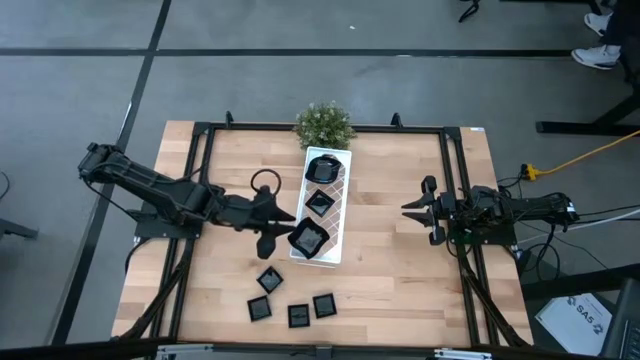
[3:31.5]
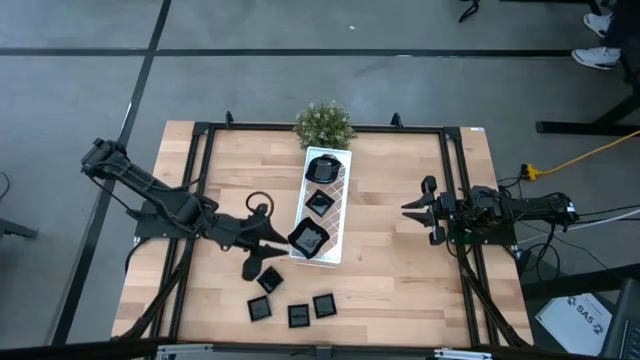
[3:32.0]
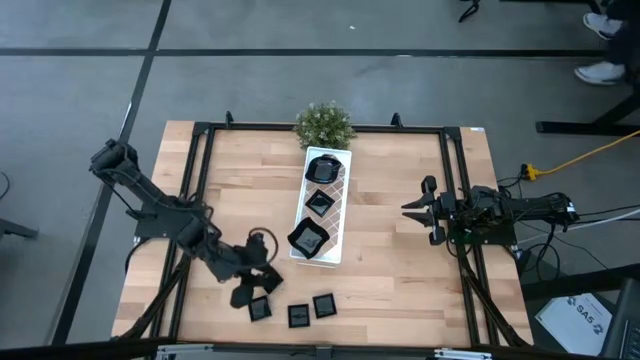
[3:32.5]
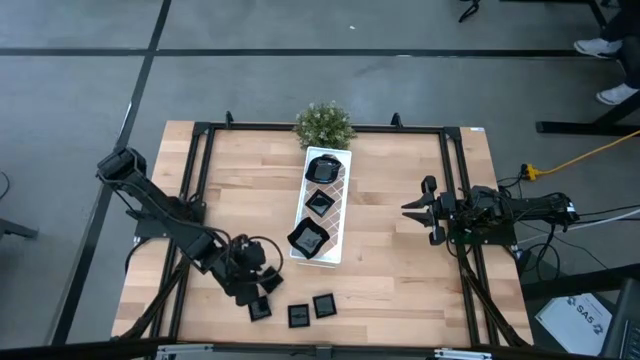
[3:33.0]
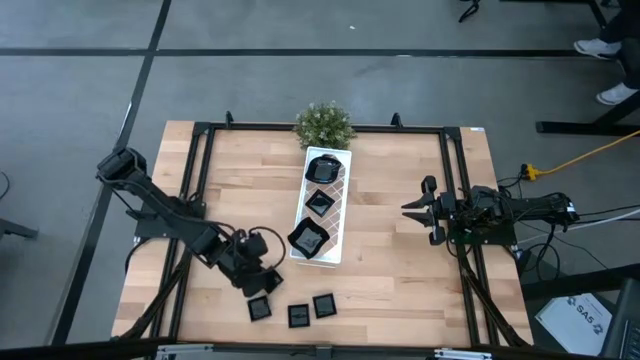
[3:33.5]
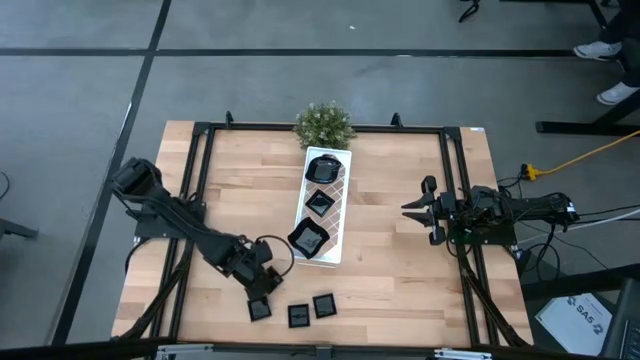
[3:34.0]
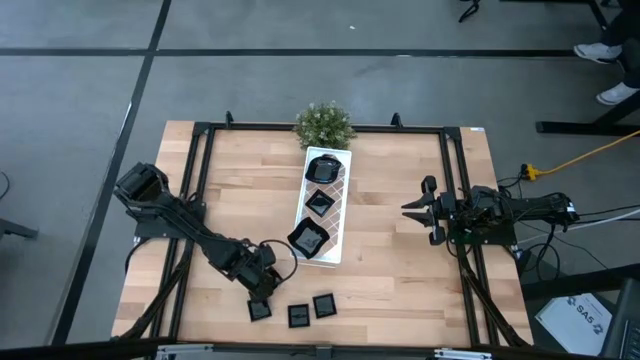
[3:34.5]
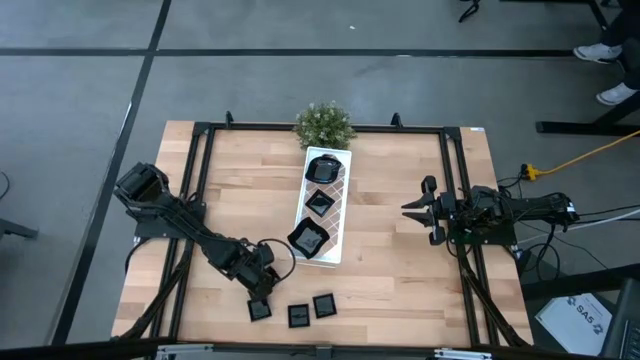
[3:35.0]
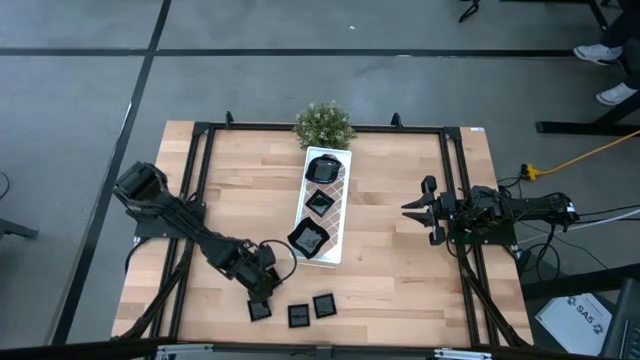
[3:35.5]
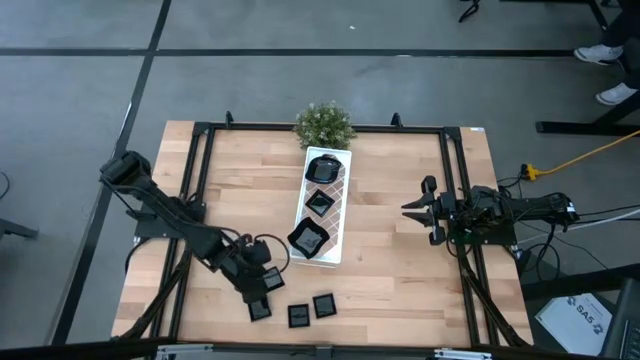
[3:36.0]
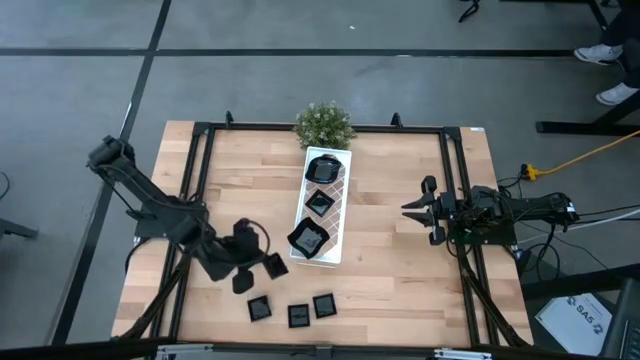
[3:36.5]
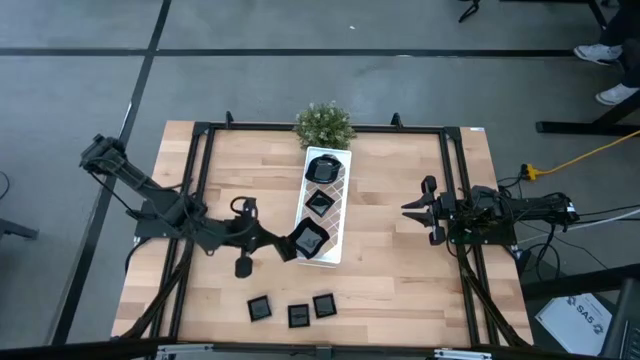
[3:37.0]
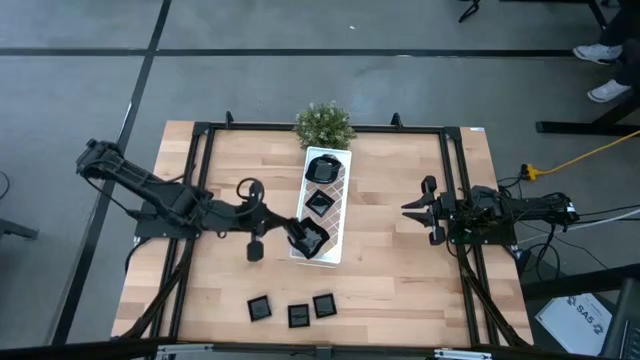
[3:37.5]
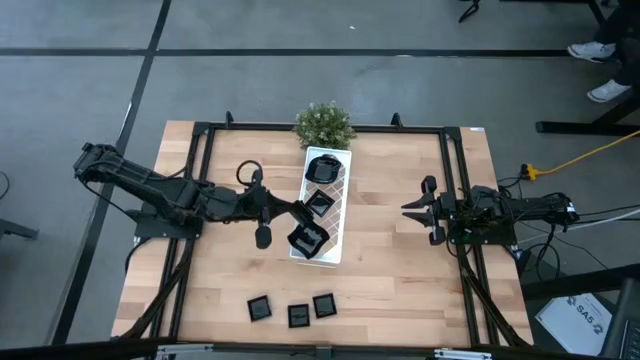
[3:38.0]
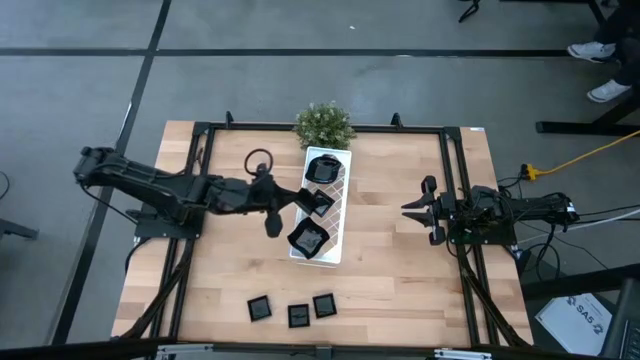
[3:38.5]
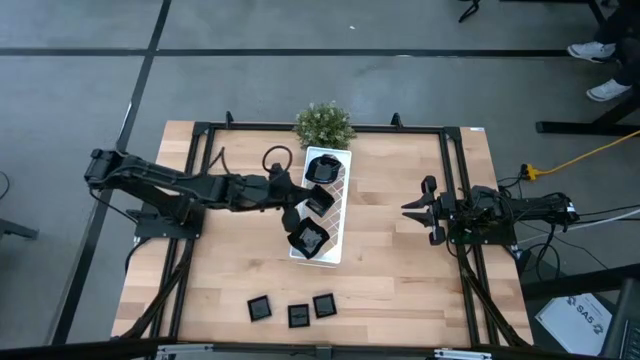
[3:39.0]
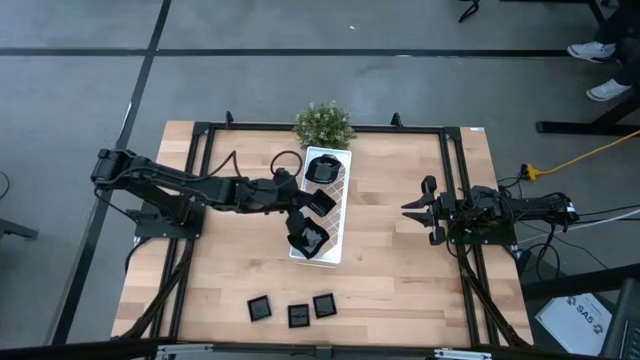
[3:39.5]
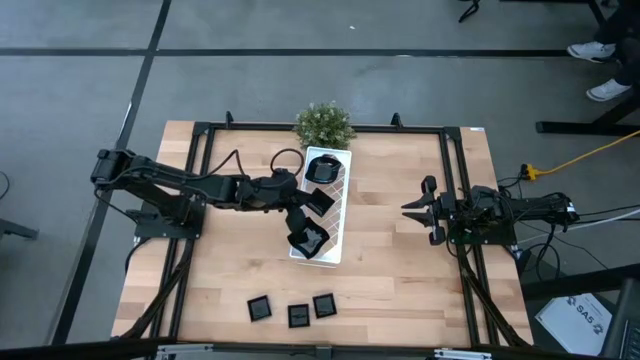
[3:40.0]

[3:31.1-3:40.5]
Task: Pick & Place Mini shaped plates
Stack the square plate on top of the square plate on the shelf

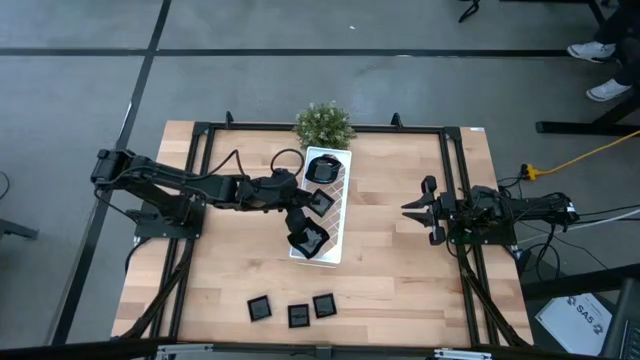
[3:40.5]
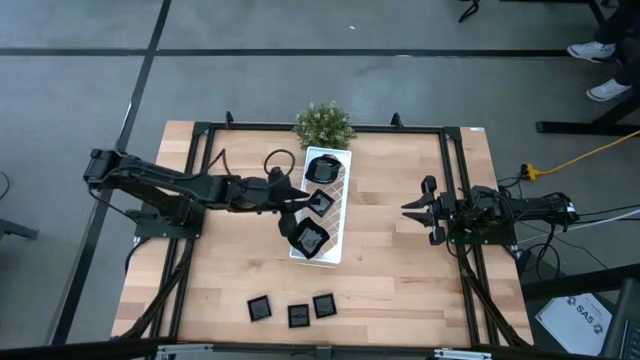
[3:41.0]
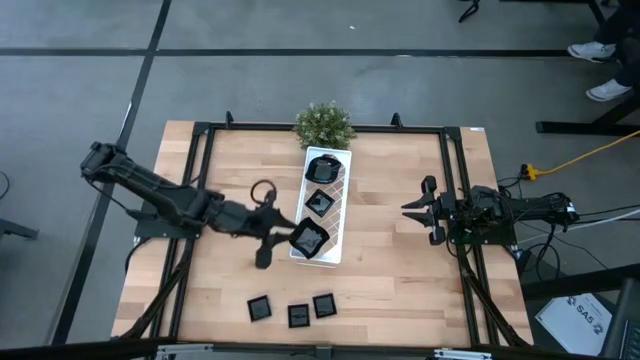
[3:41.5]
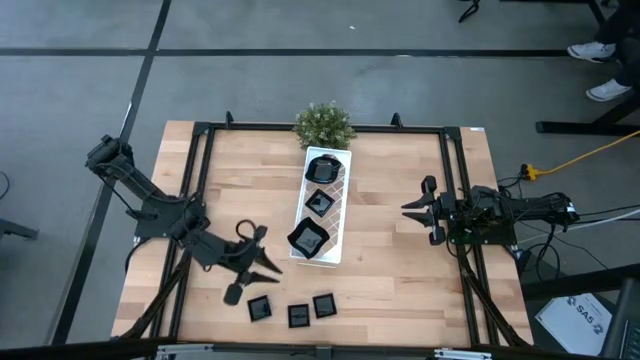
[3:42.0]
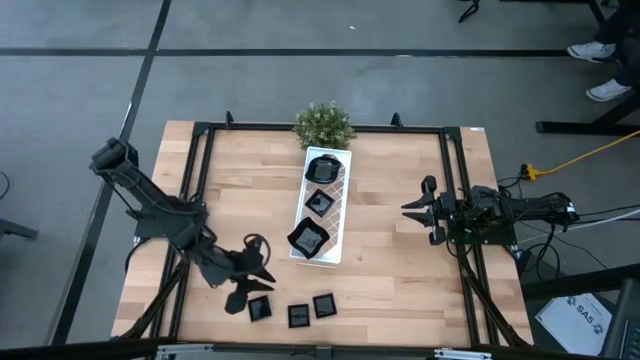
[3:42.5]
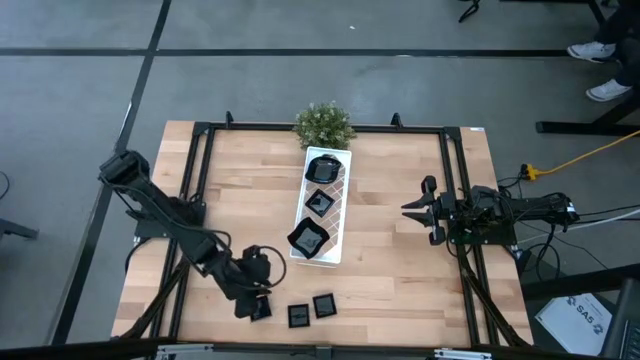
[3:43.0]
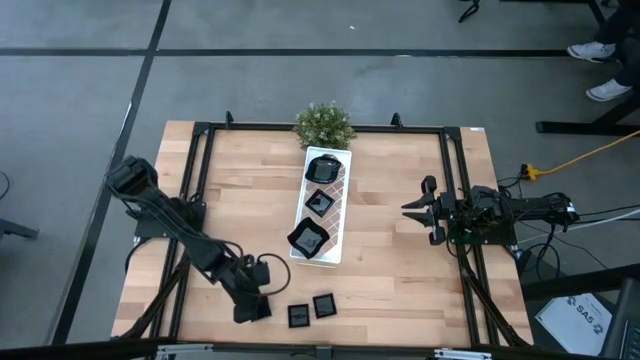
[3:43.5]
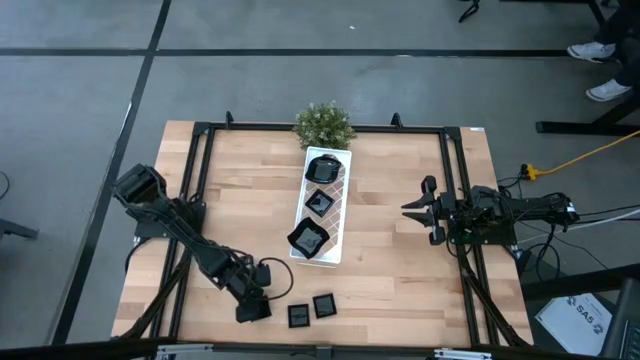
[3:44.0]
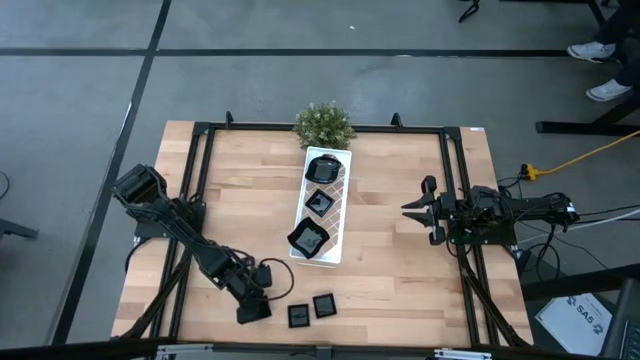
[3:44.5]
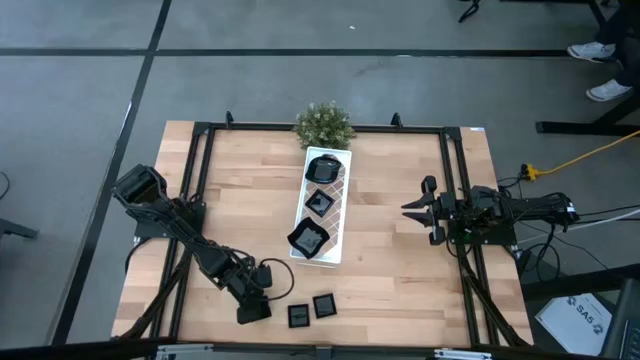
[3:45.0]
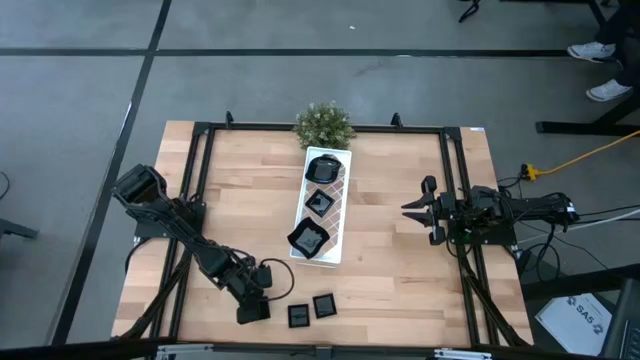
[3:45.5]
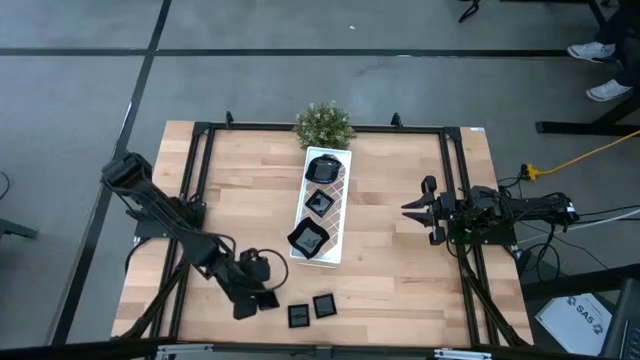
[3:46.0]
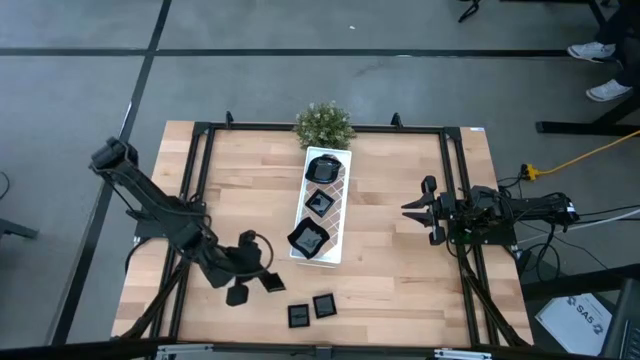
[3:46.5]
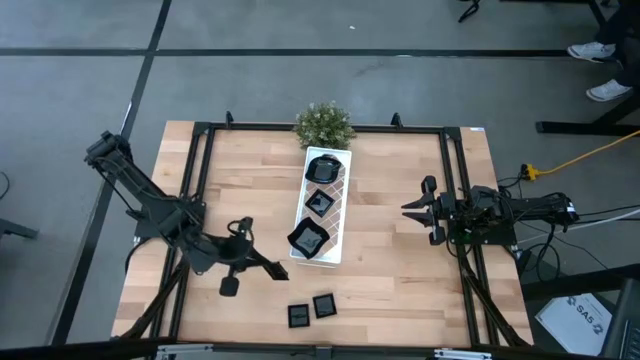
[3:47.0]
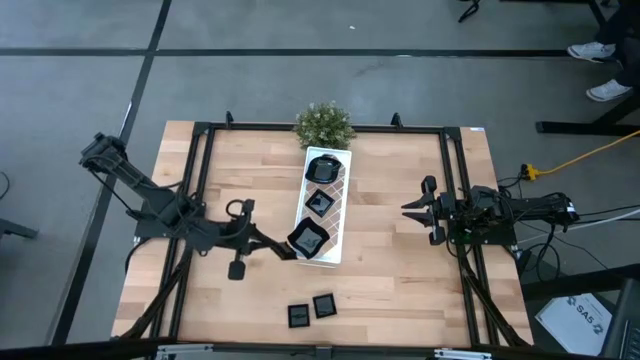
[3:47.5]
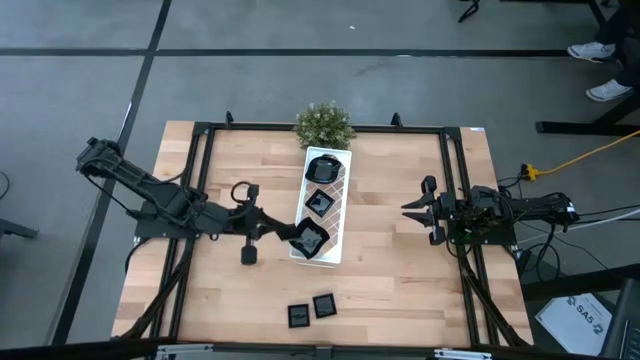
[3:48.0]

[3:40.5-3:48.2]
Stack the square plate on top of the square plate on the shelf

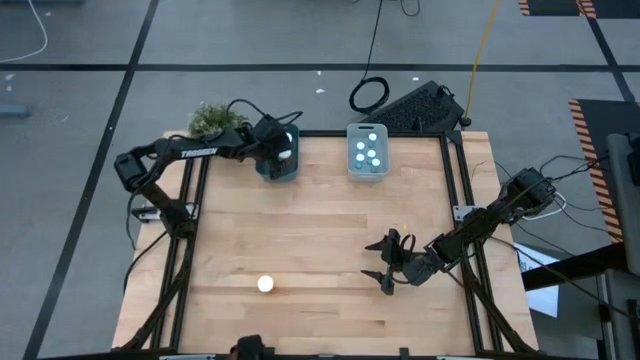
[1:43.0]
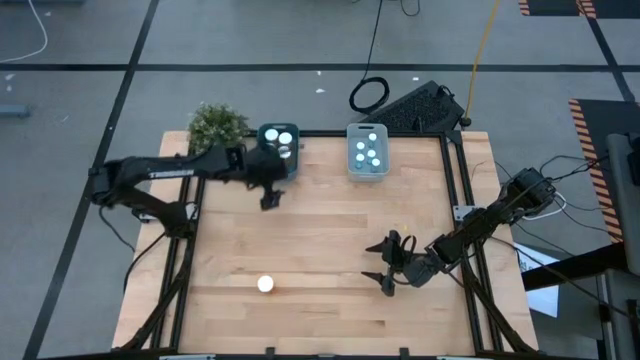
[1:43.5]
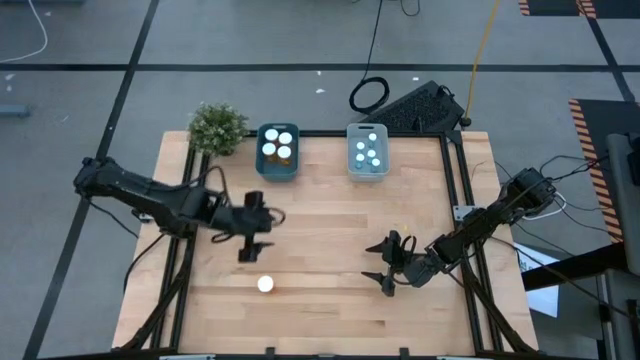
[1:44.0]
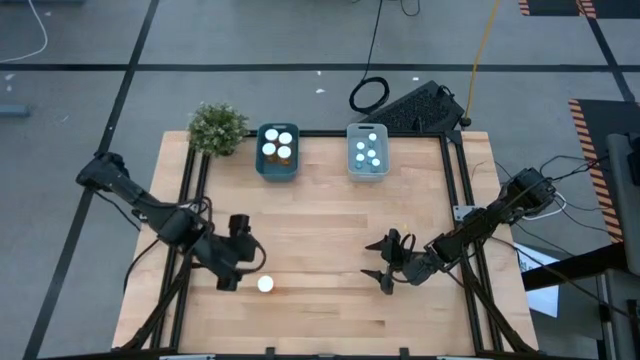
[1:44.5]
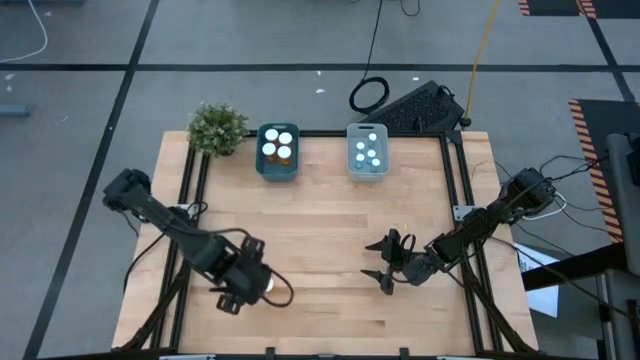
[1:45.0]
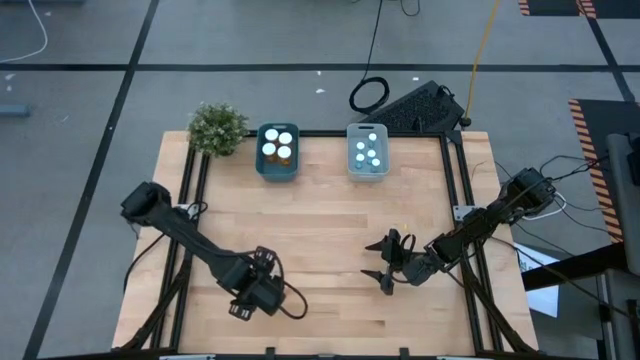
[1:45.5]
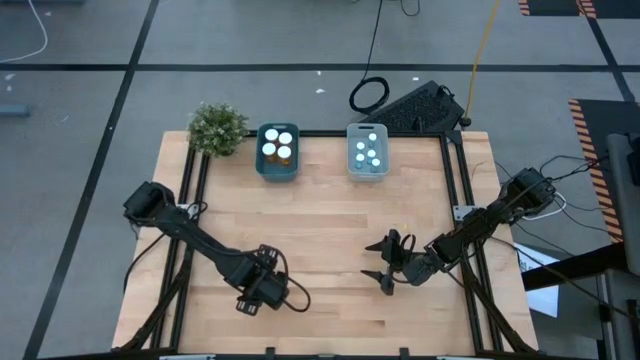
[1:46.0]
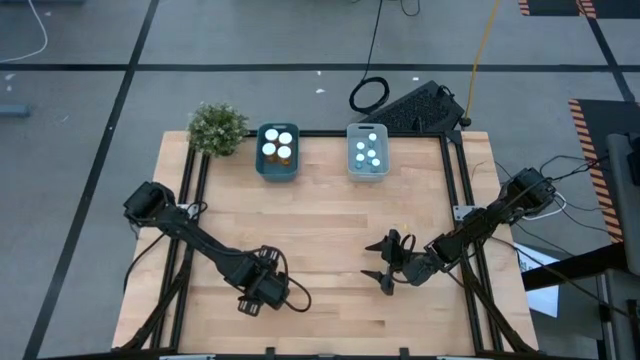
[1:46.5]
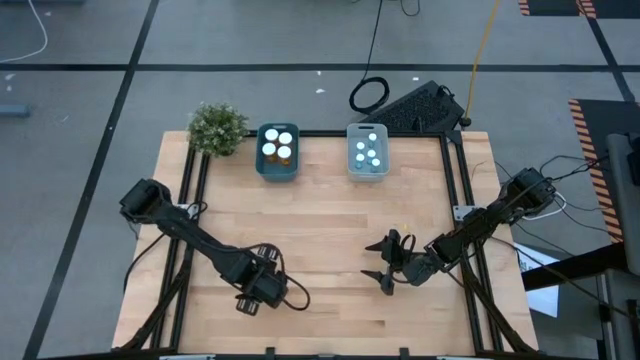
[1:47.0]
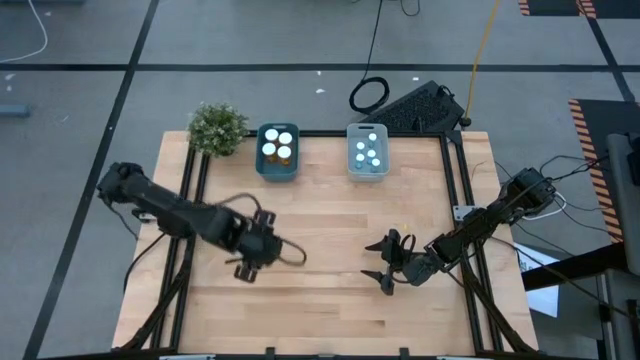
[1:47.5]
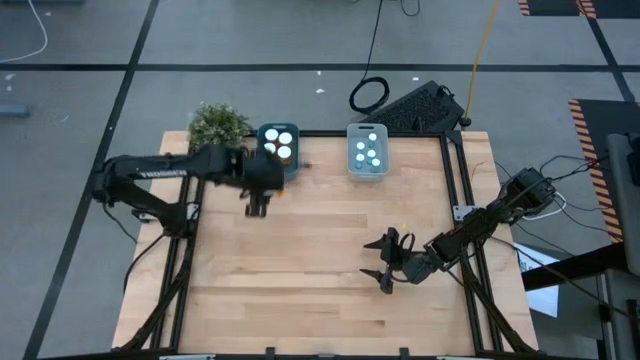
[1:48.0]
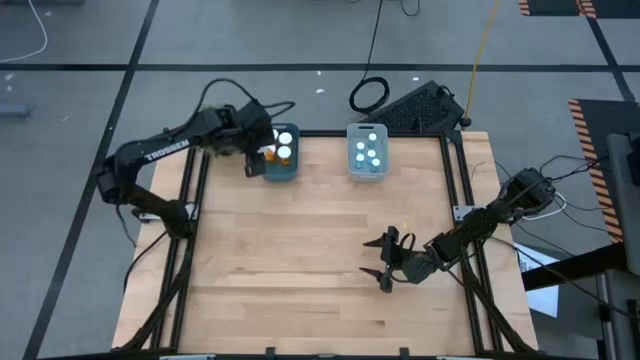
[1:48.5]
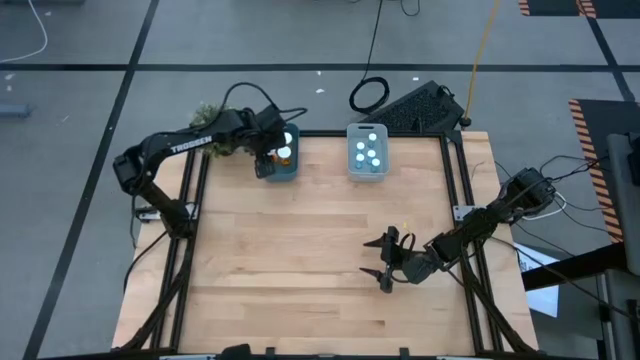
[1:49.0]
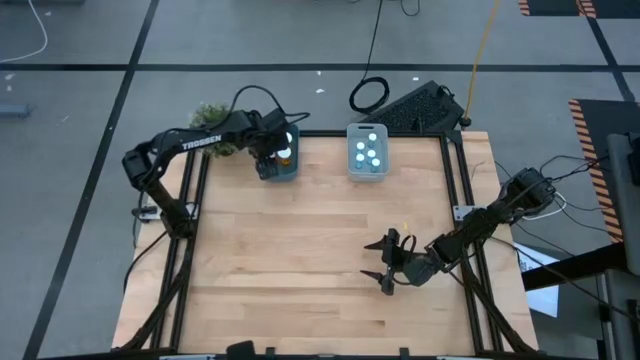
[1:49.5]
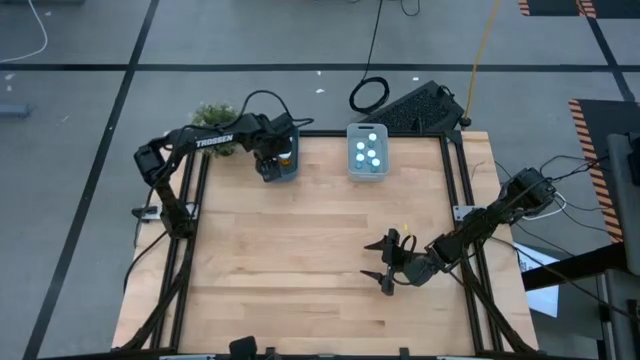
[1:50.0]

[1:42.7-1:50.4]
Task: Pick and place medicine bottles into bin by pill shape (circle, oval)
Put the orange pill bottle into the green bin
